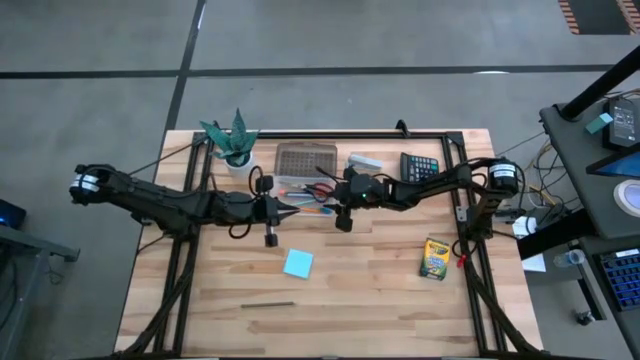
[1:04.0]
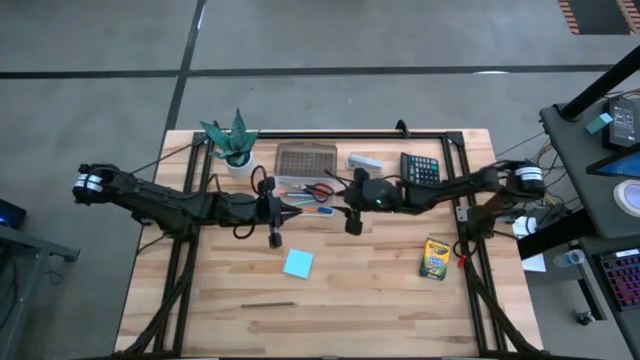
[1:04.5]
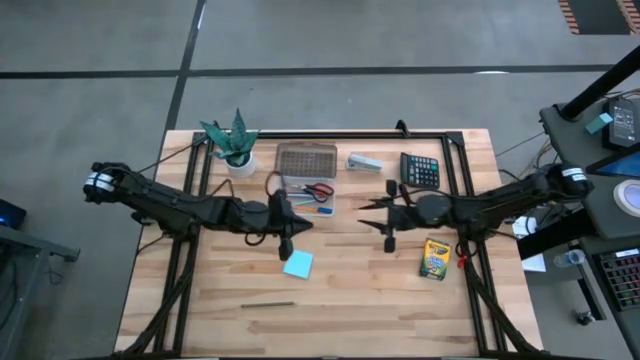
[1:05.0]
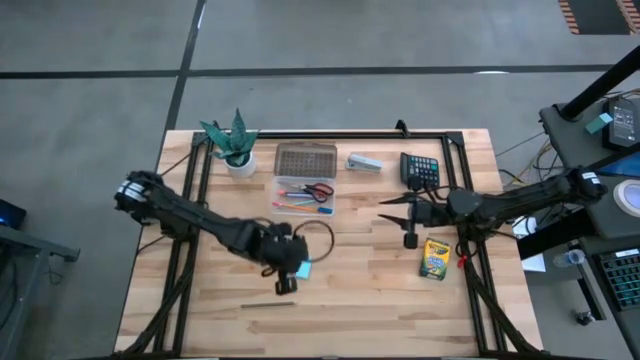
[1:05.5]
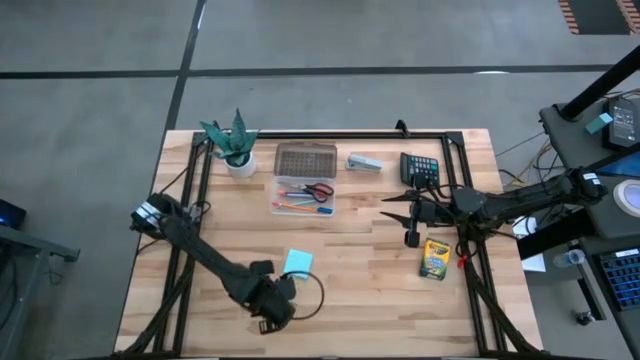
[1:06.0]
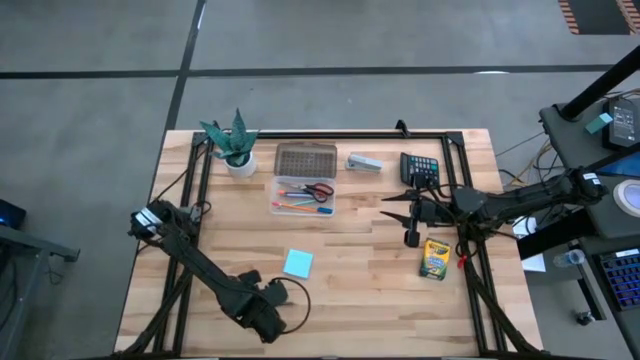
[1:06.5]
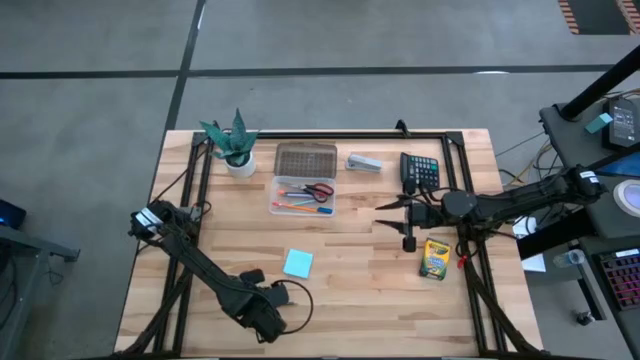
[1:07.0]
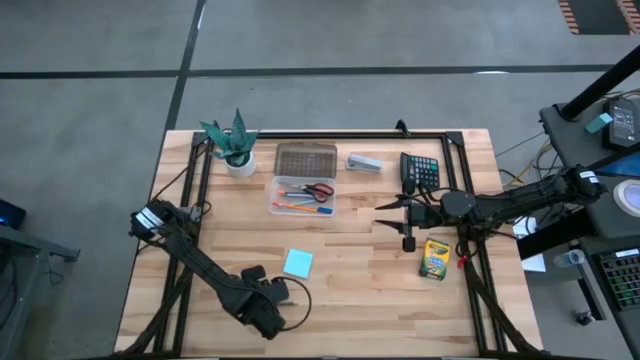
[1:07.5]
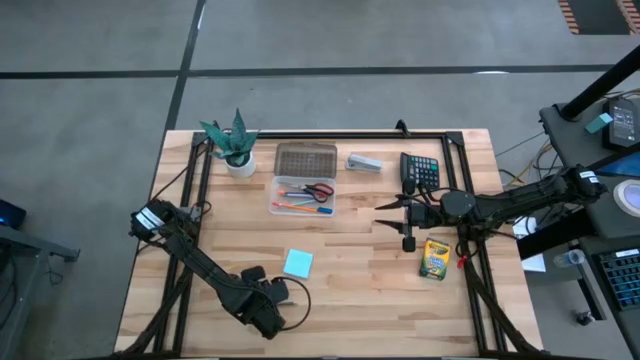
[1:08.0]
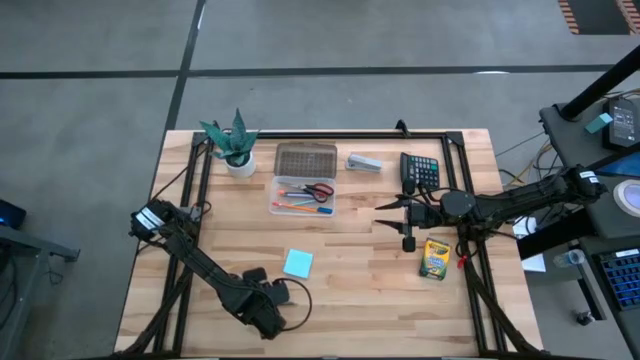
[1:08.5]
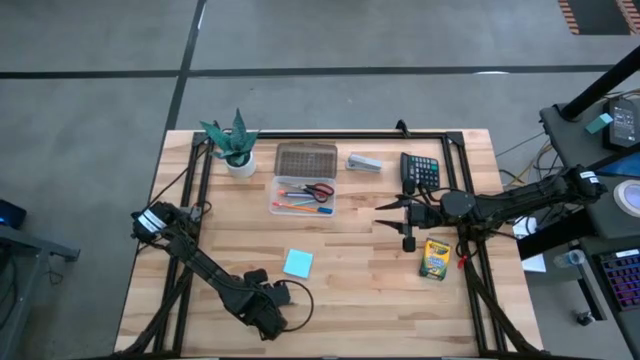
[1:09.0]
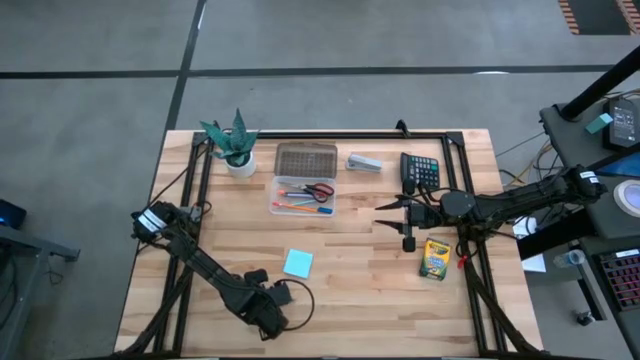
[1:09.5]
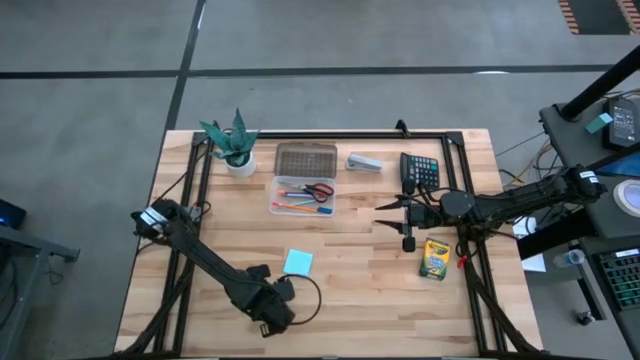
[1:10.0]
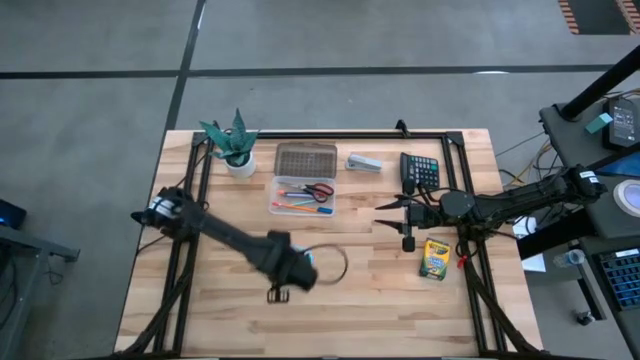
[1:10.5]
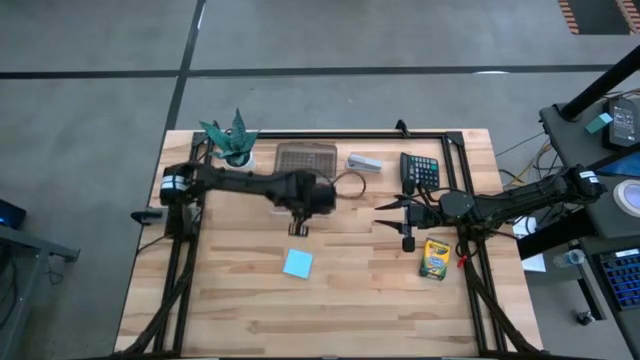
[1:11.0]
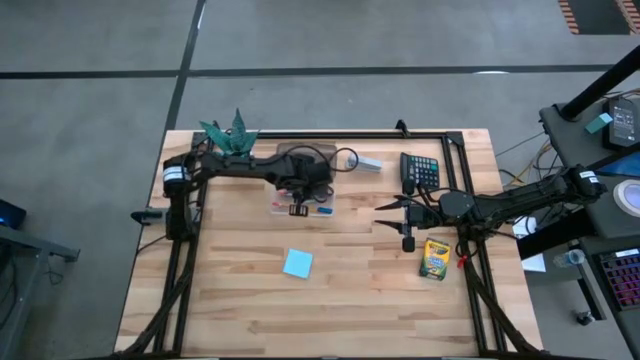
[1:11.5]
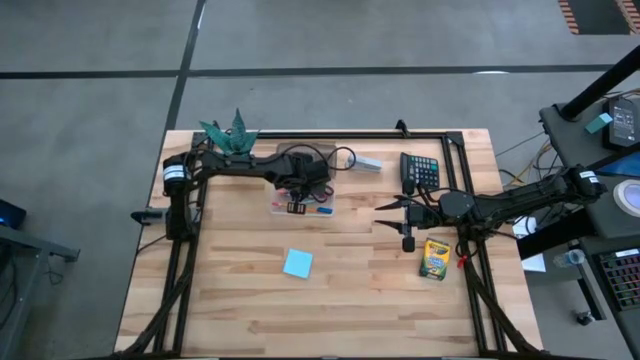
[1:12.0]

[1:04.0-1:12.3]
Task: Pack school essentials
Put the blue pencil into the supply box

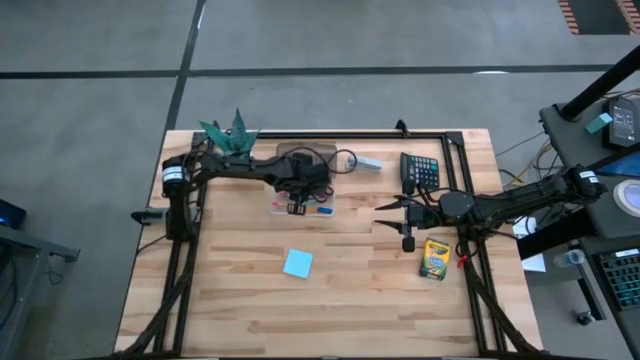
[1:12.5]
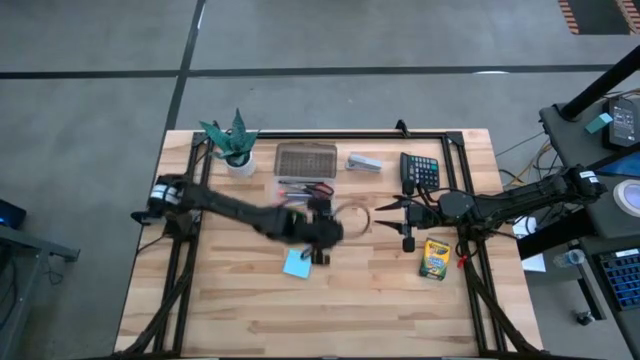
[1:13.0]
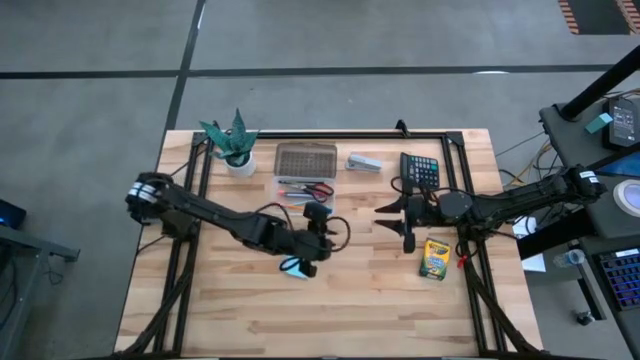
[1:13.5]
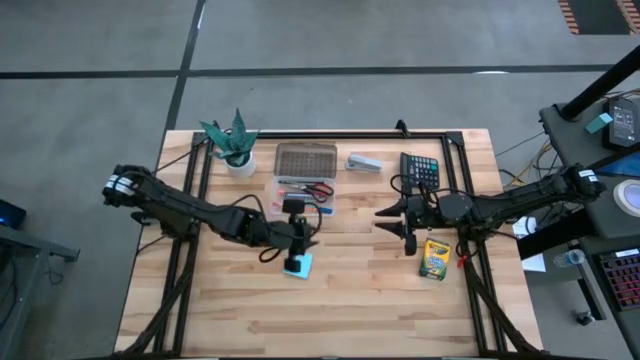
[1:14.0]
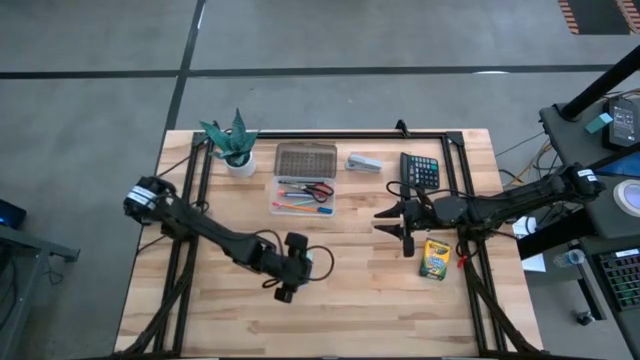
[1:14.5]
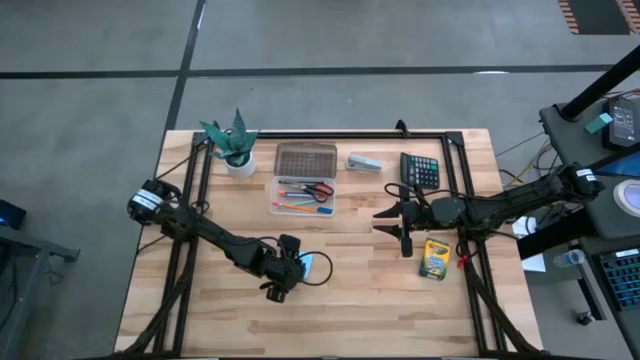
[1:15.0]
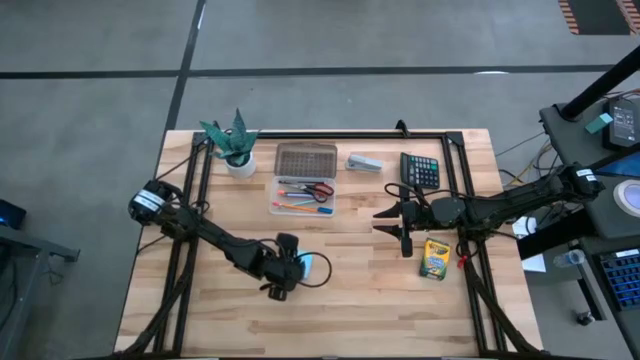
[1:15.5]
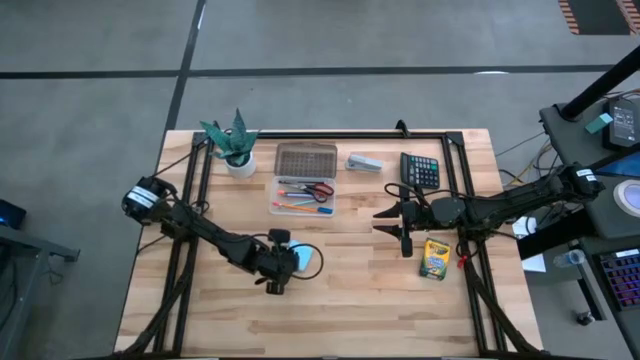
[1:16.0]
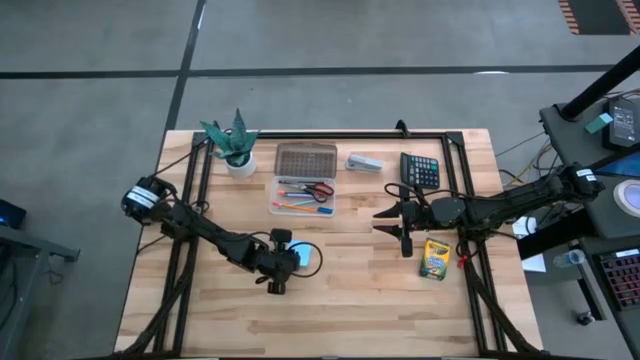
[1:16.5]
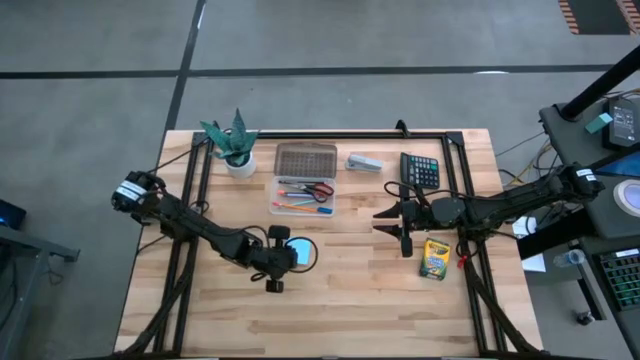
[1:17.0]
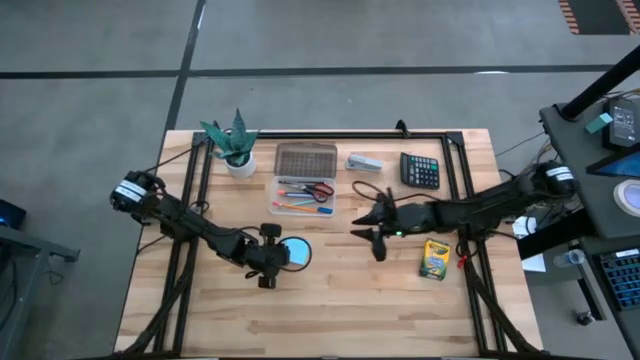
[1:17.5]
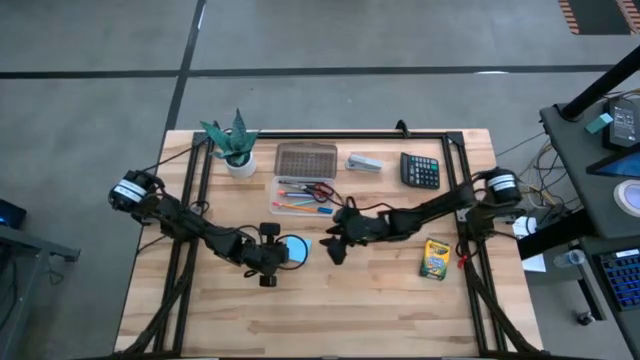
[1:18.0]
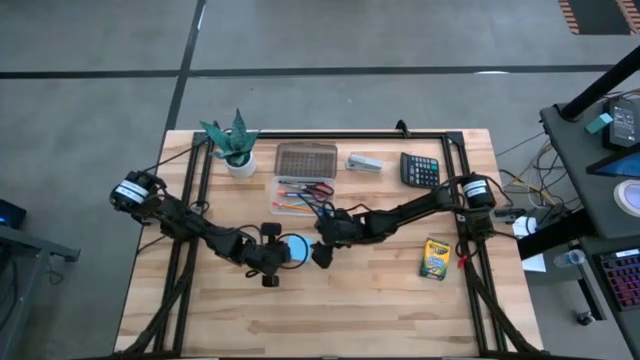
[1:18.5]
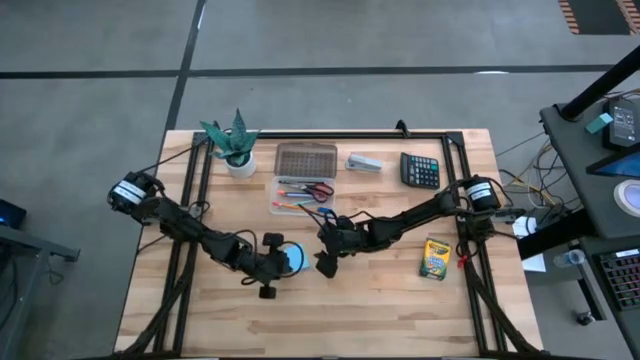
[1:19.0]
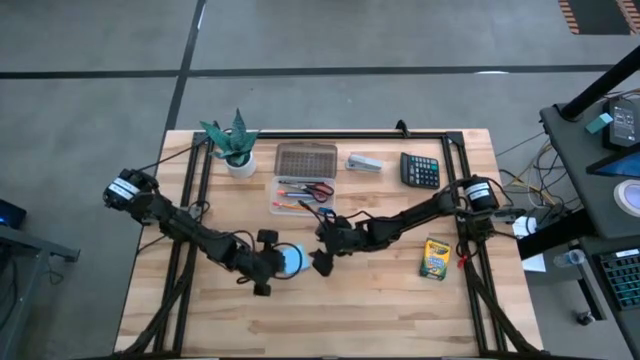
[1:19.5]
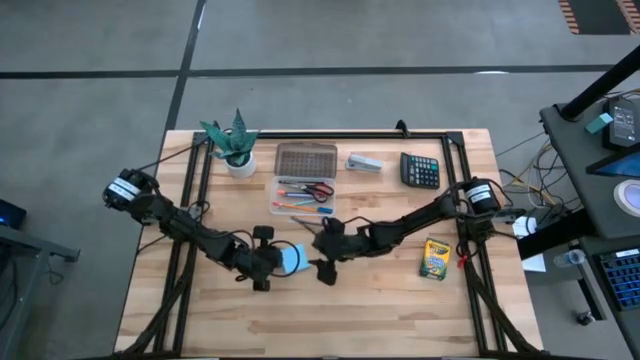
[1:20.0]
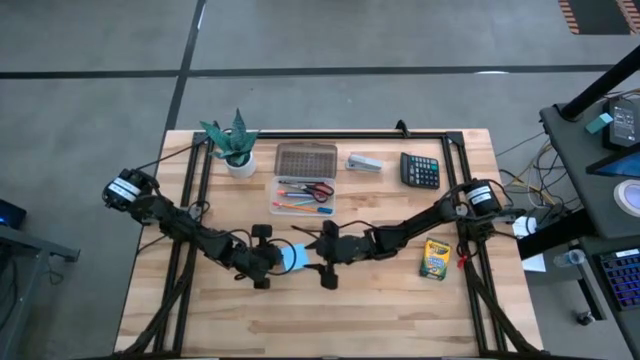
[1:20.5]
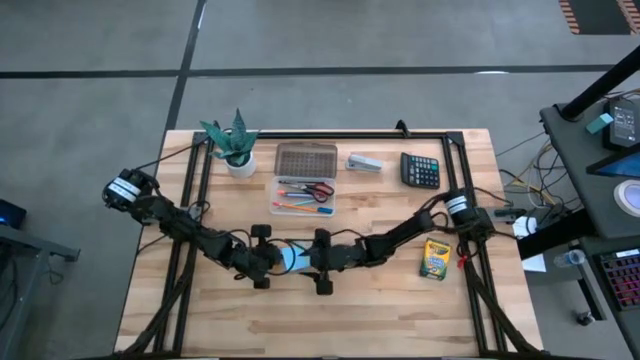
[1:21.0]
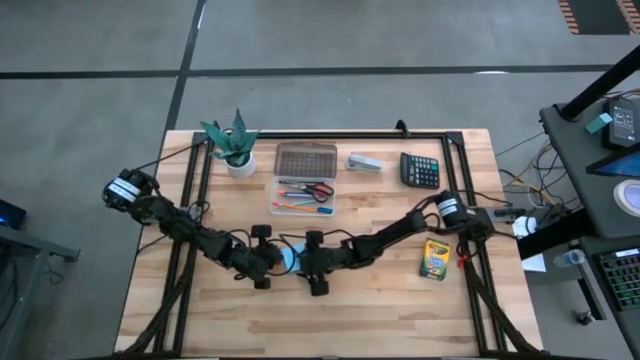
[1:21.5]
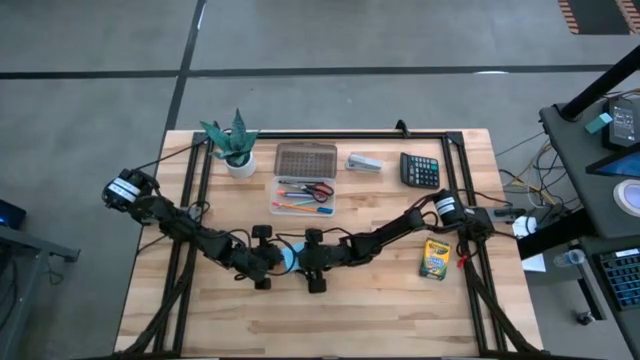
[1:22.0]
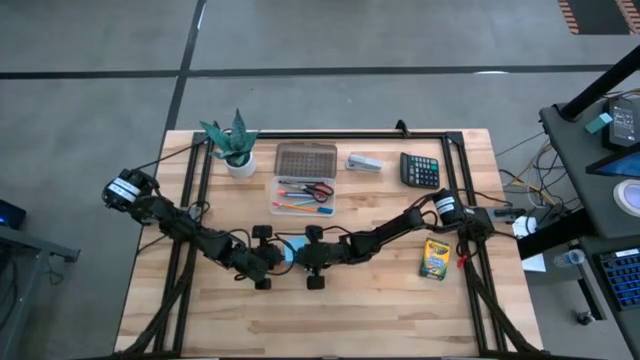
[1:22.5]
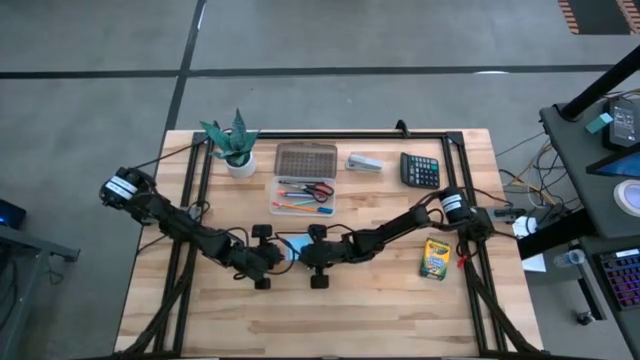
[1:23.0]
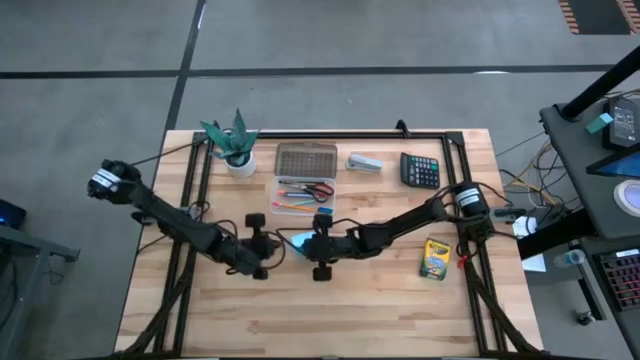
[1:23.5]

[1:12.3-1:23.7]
Put the blue sticky notes into the supply box

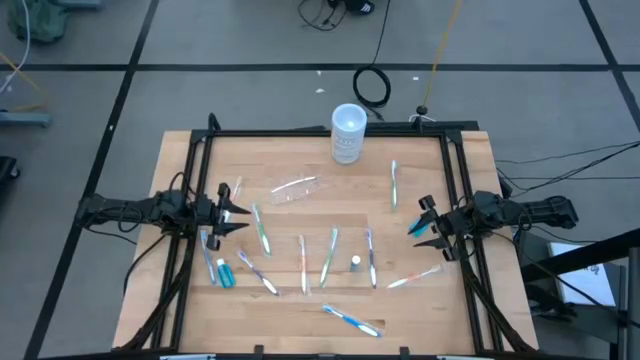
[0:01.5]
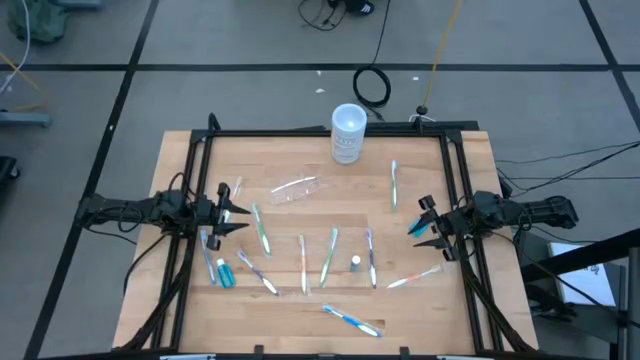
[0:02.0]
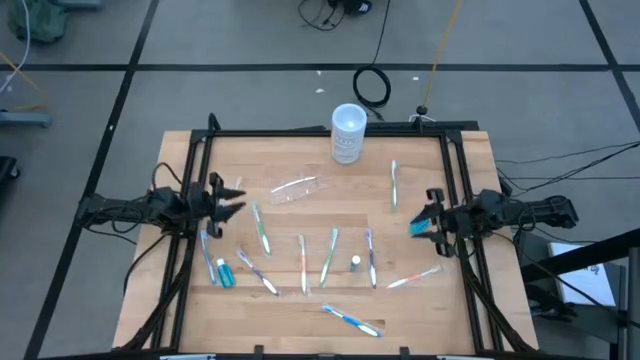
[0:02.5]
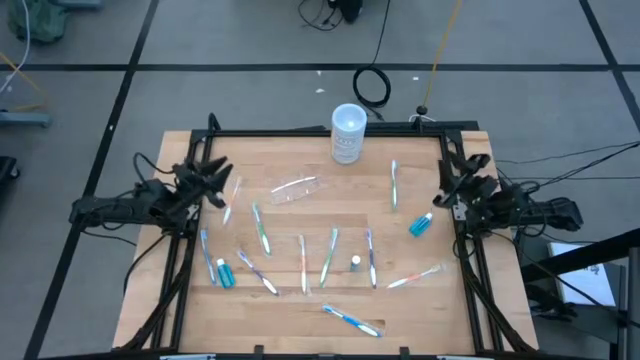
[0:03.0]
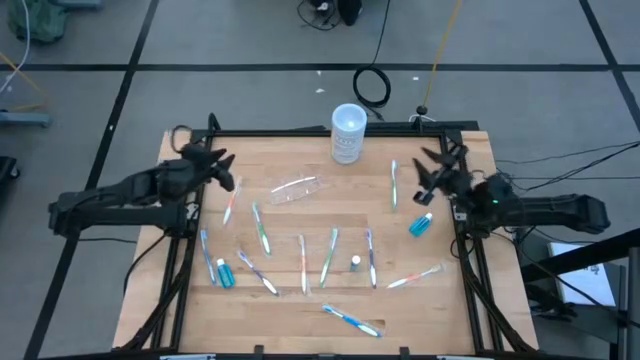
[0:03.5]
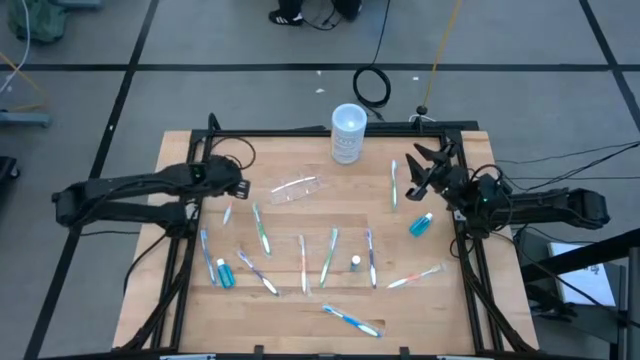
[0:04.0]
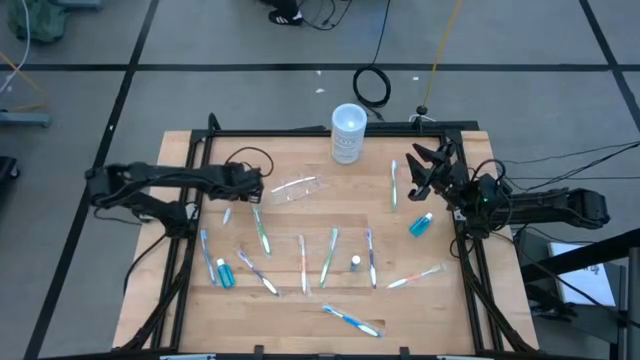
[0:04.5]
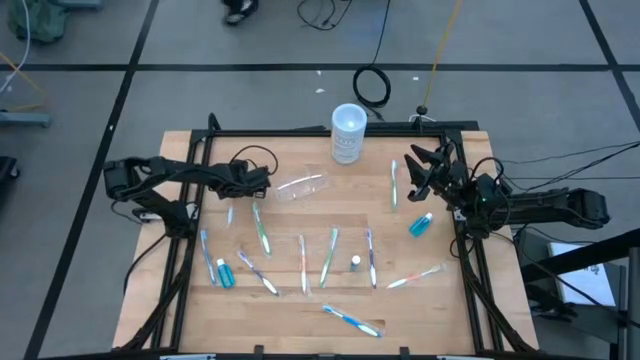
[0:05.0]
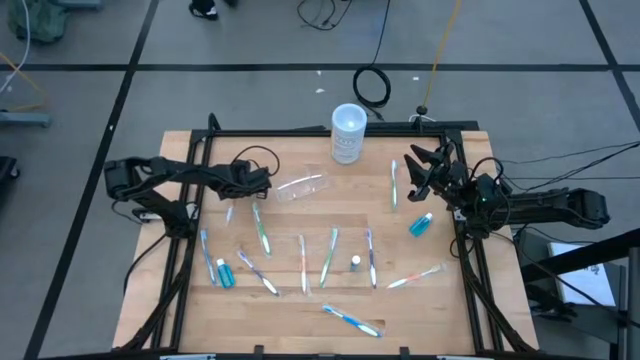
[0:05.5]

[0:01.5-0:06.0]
Task: Pick & Place toothbrushing station
Put the top left orange toothbrush into the transparent organizer
